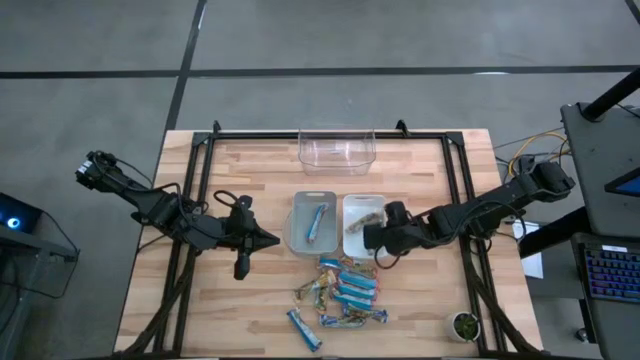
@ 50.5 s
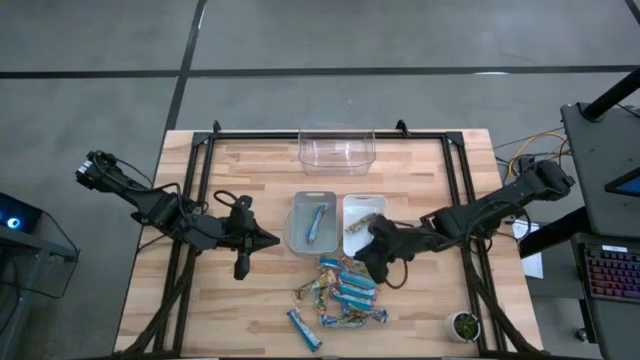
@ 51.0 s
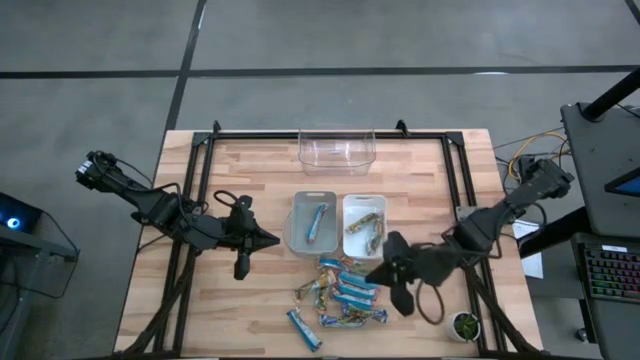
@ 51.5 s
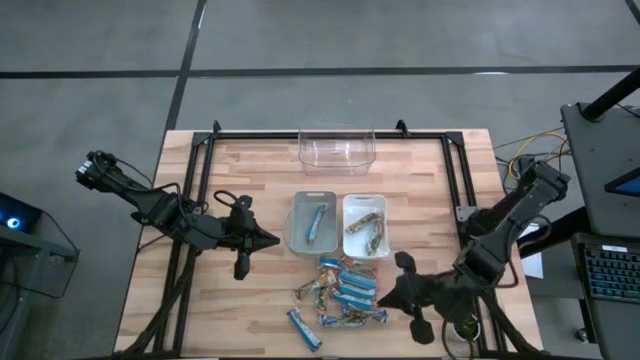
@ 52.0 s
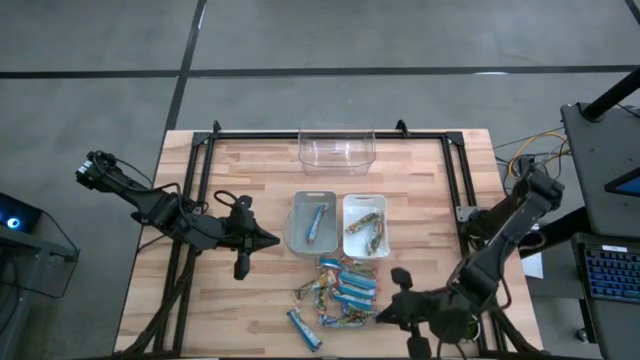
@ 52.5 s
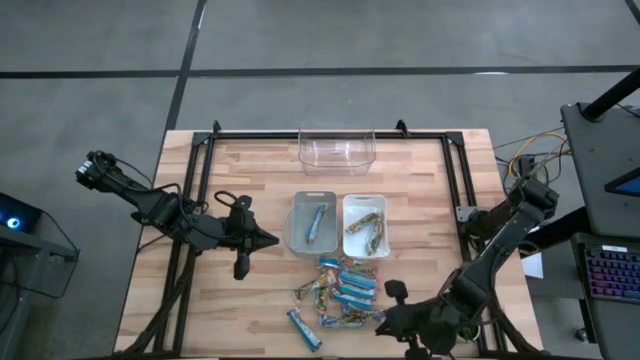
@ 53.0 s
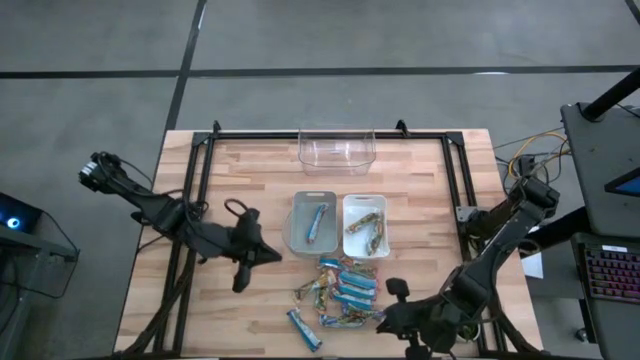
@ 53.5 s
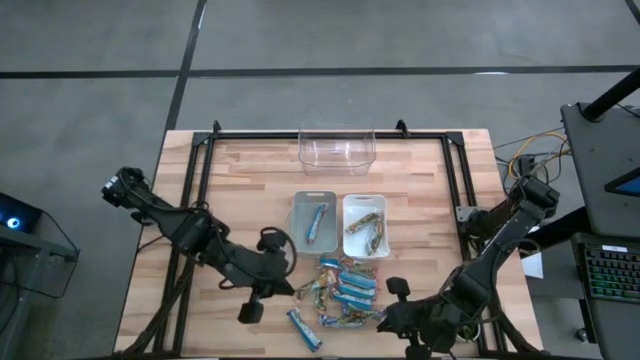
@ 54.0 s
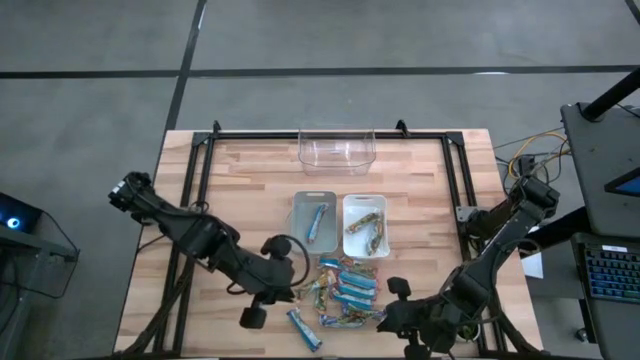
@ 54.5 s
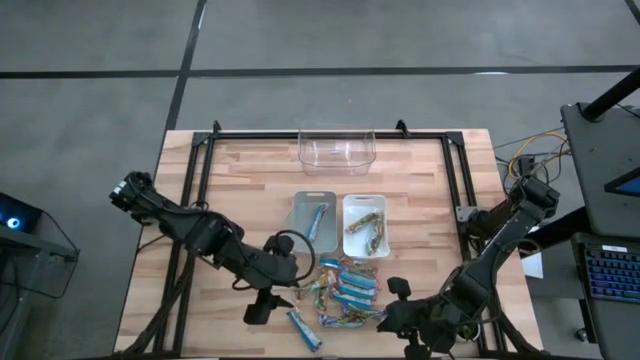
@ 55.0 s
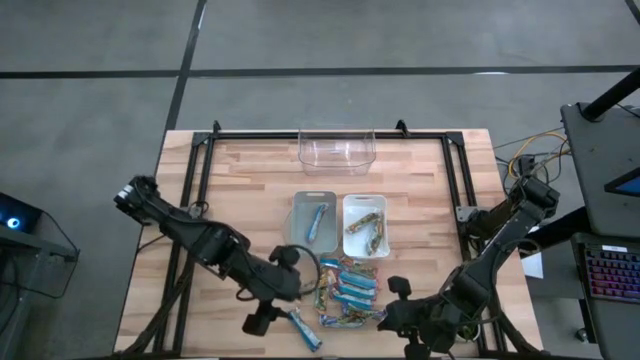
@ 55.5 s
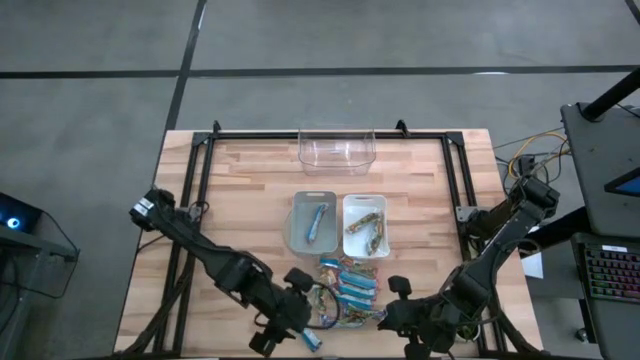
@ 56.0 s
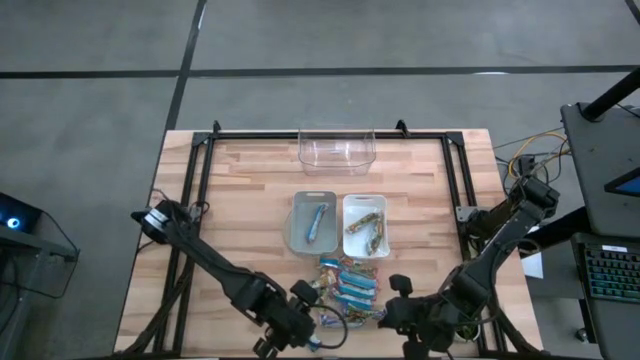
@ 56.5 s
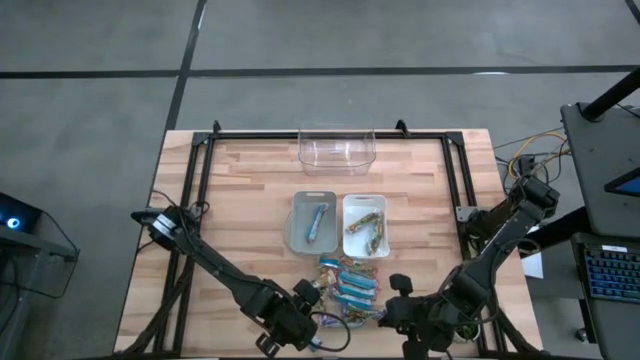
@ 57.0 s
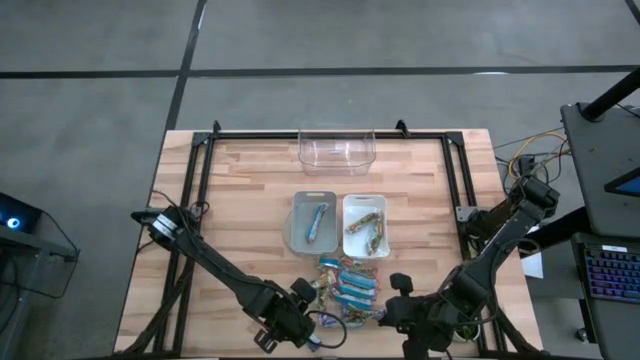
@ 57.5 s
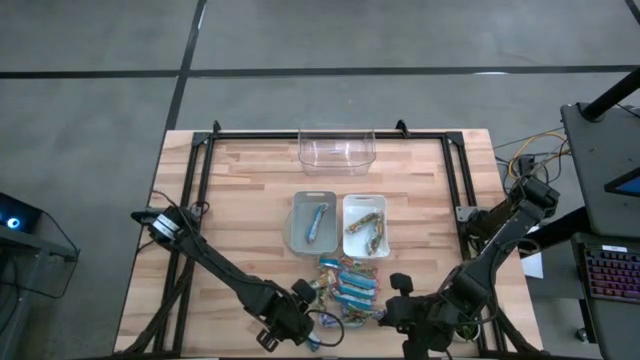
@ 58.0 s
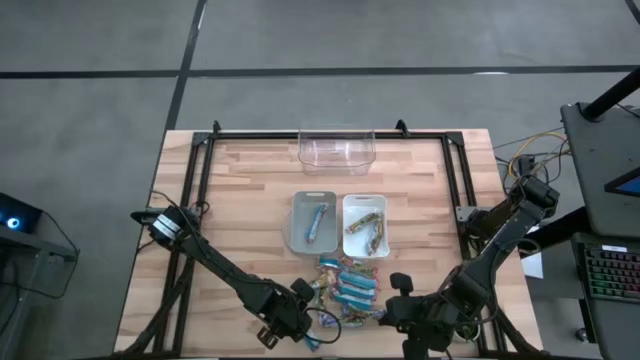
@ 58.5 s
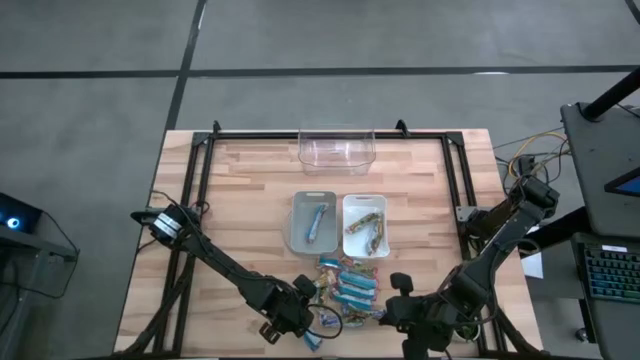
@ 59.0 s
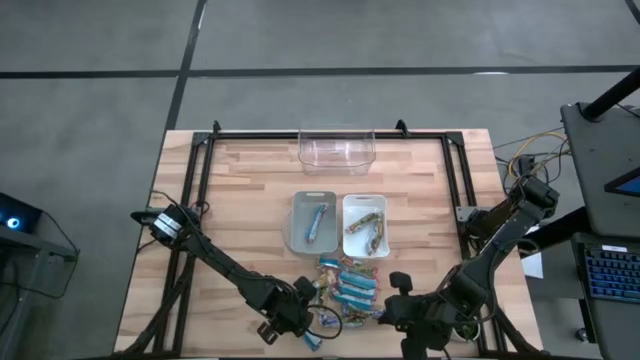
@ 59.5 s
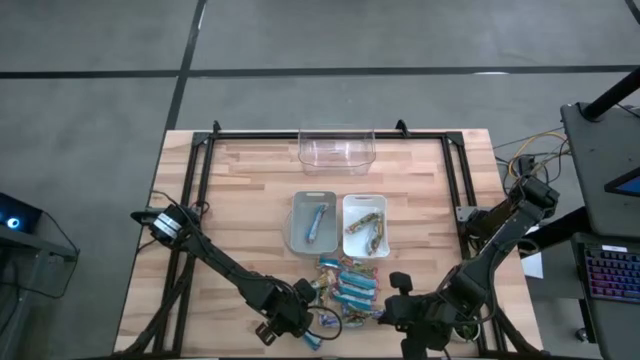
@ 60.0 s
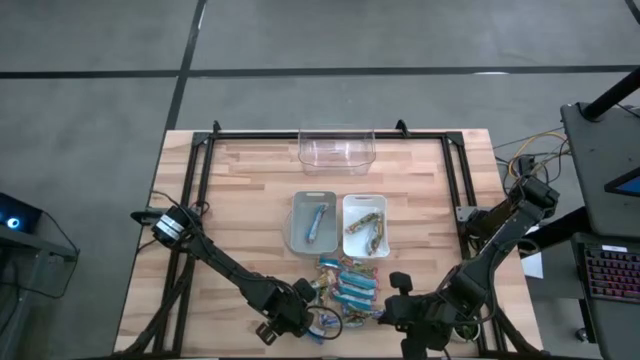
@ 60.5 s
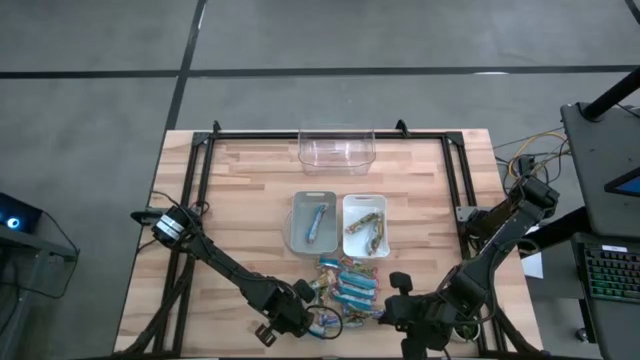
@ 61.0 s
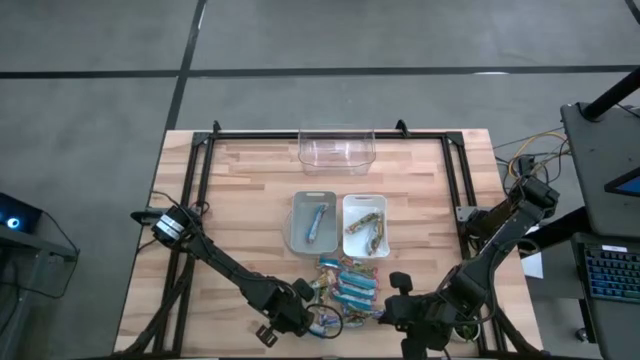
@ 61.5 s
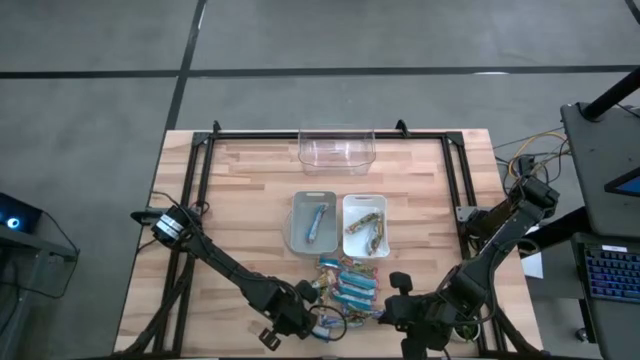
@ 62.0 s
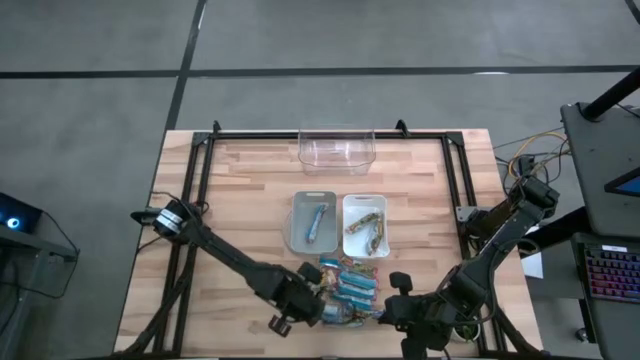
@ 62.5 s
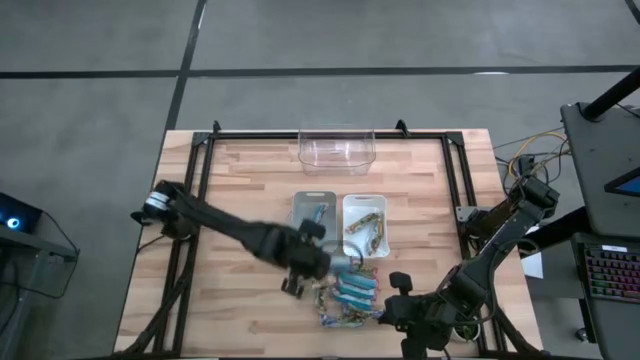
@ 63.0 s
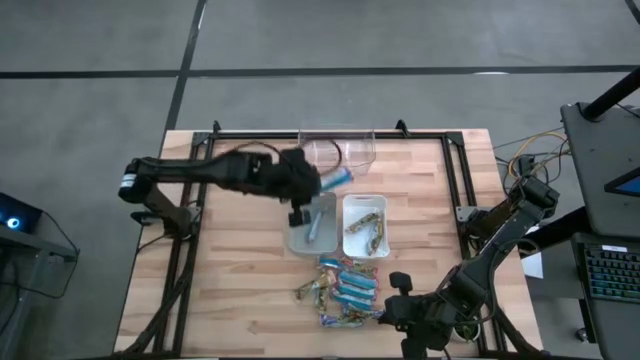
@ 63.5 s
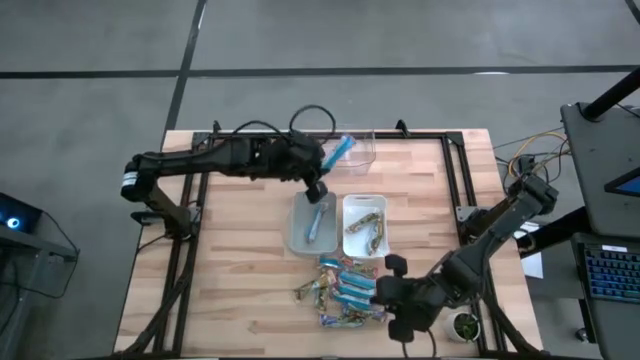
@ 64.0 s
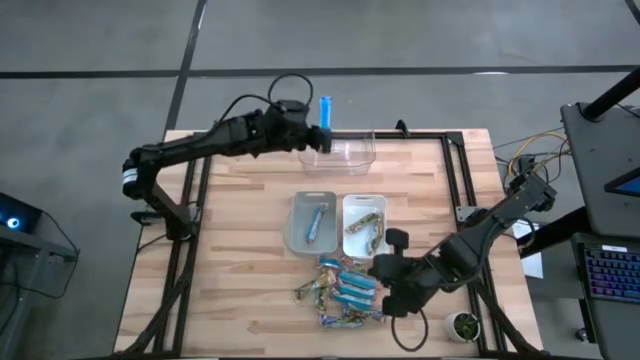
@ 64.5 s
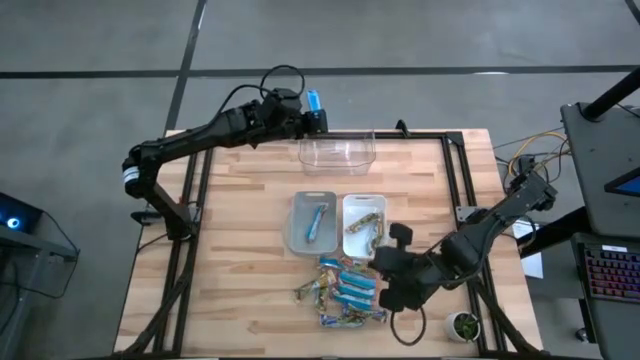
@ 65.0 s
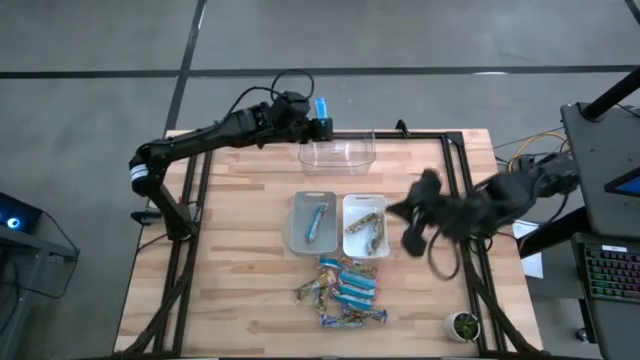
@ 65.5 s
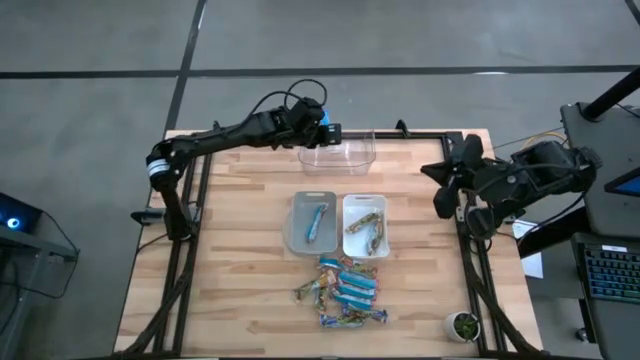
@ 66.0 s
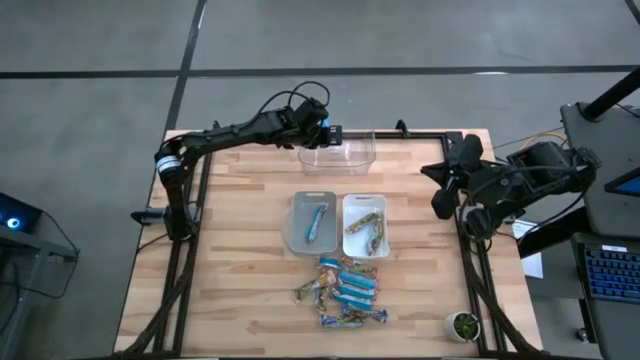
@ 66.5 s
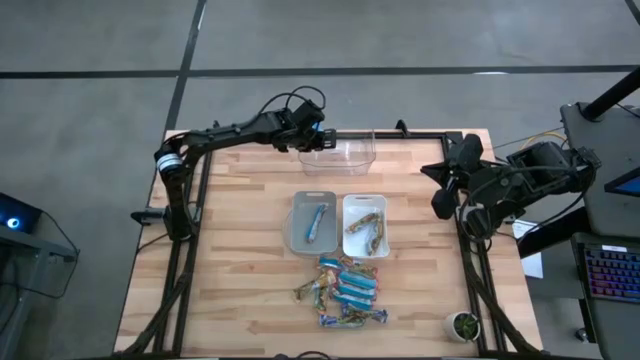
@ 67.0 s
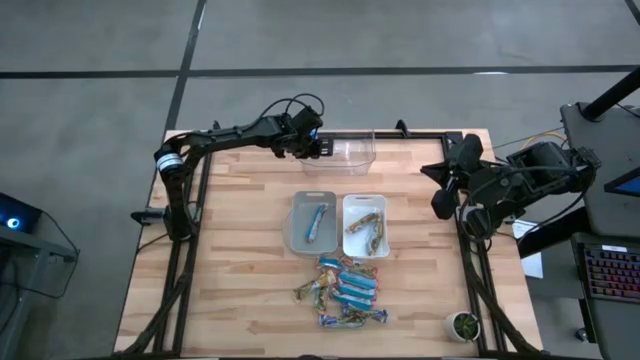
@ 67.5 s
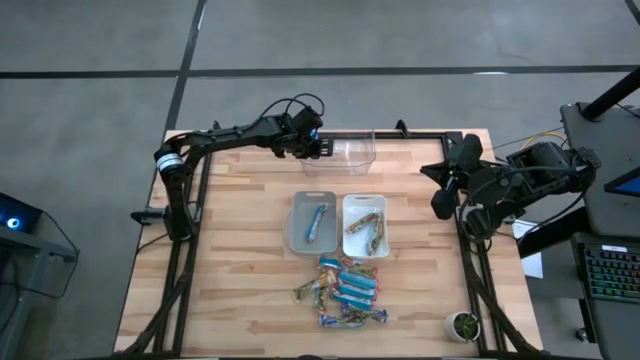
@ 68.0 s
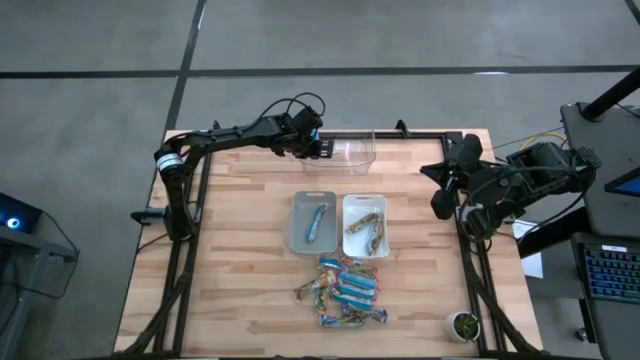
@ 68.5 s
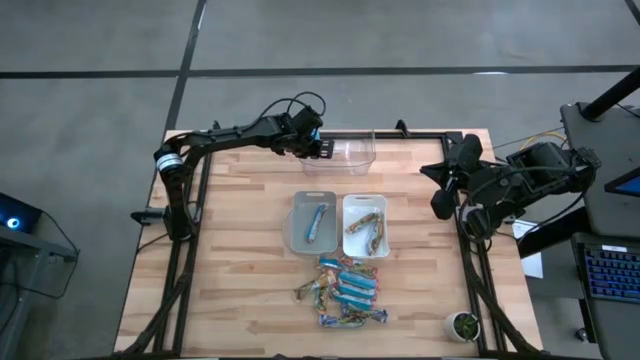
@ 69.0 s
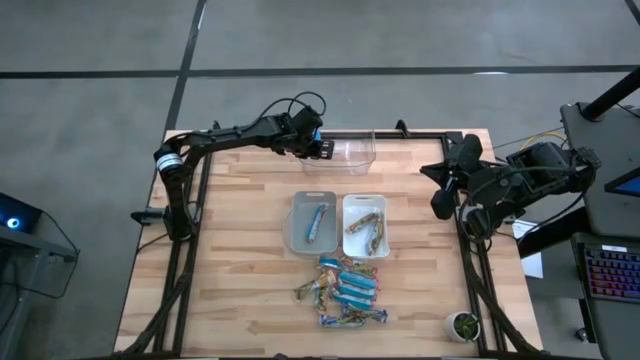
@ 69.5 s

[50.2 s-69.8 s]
Task: Pick and place Granola Bars by type
Put the blue granola bar into the transparent bin

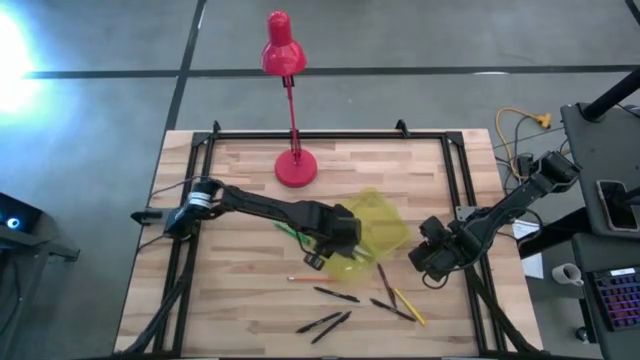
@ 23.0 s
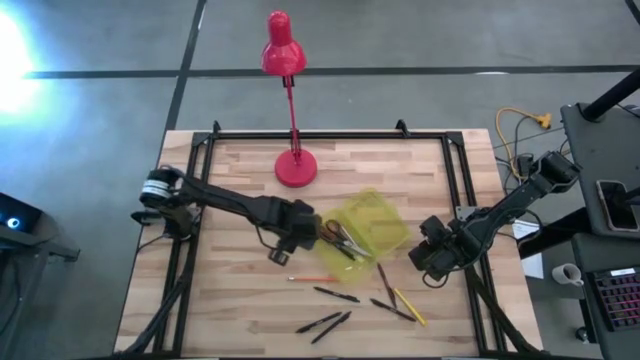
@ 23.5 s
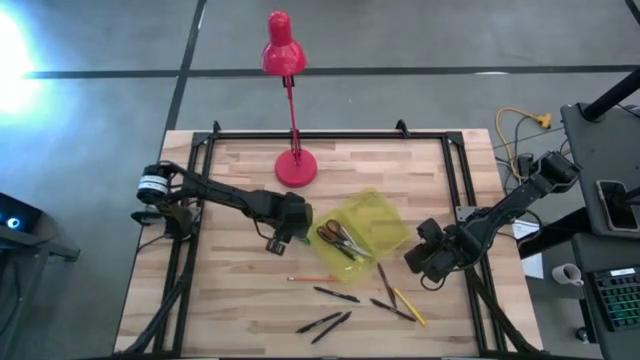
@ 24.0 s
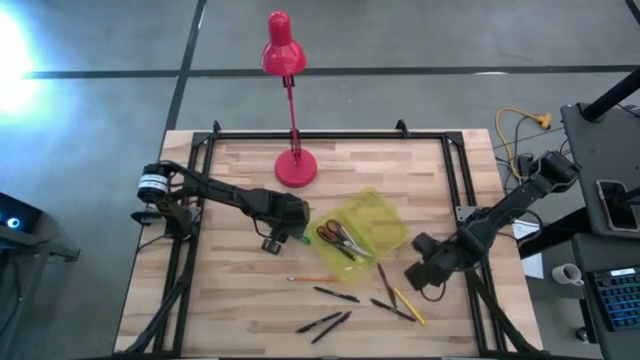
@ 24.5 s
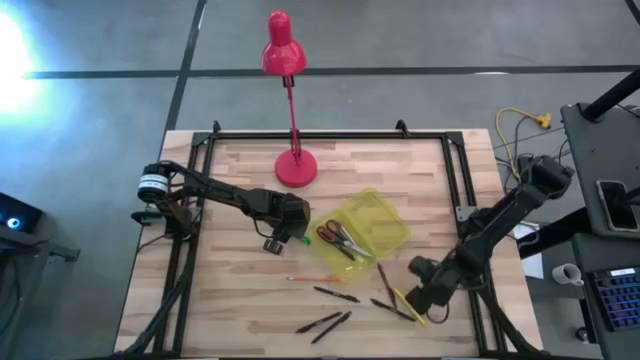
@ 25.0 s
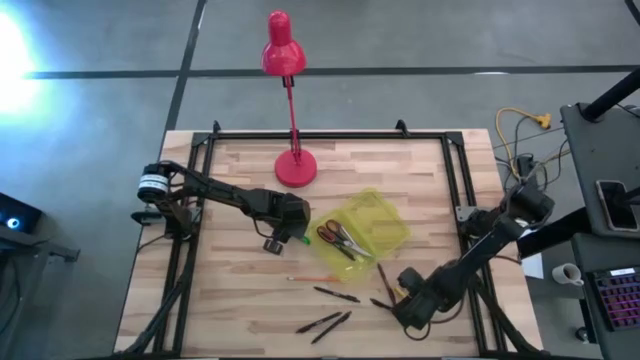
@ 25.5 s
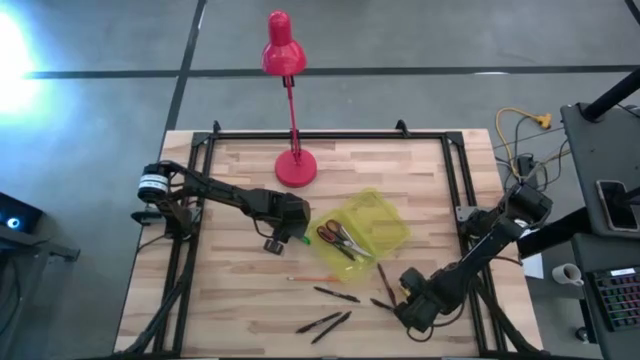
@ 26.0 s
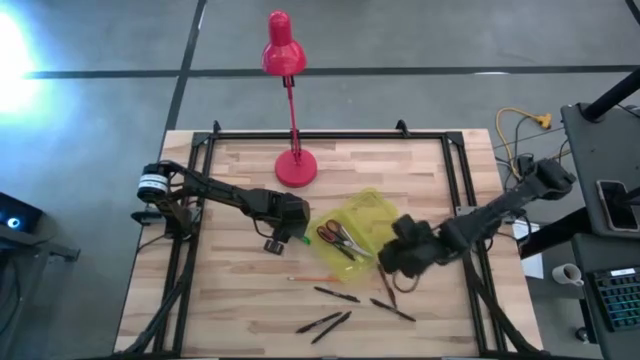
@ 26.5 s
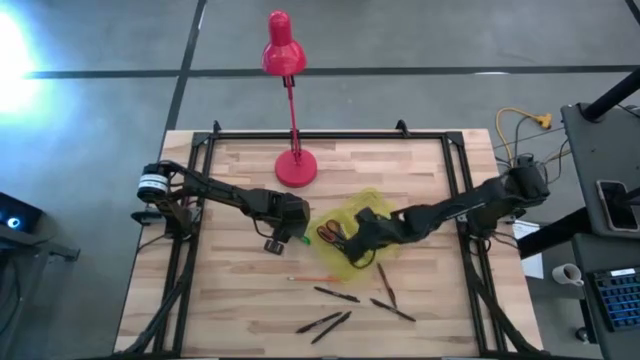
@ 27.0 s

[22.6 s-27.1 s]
Task: Pick & place school supplies into a supply box
Put the yellow pen into the yellow supply box
